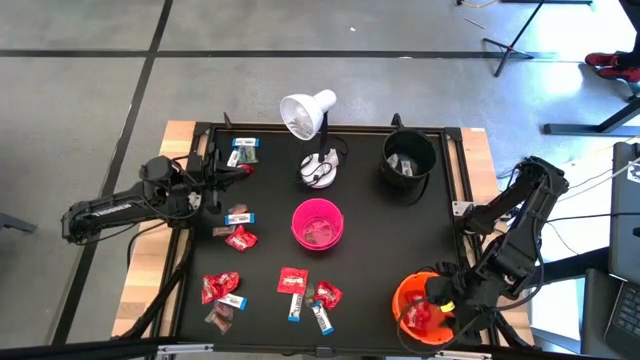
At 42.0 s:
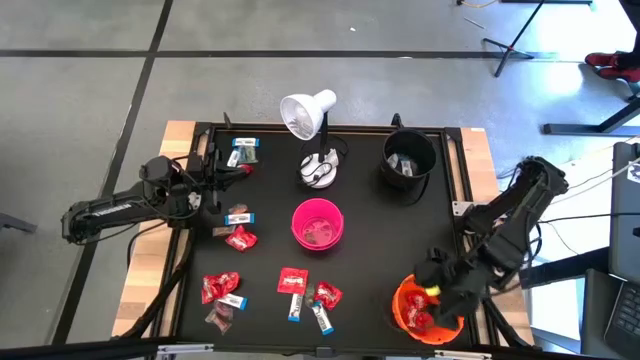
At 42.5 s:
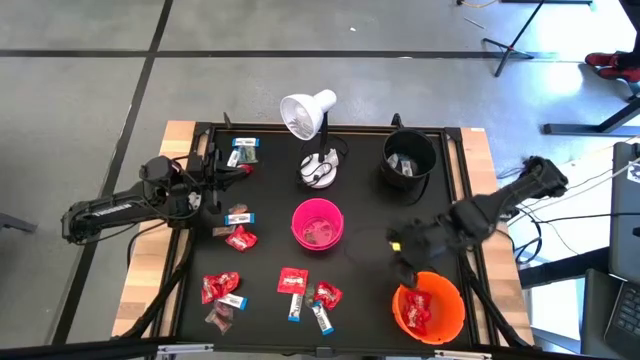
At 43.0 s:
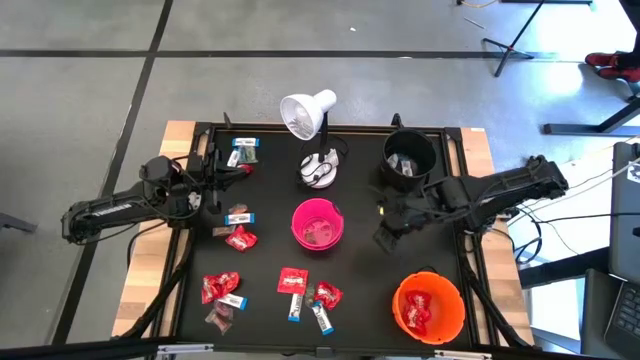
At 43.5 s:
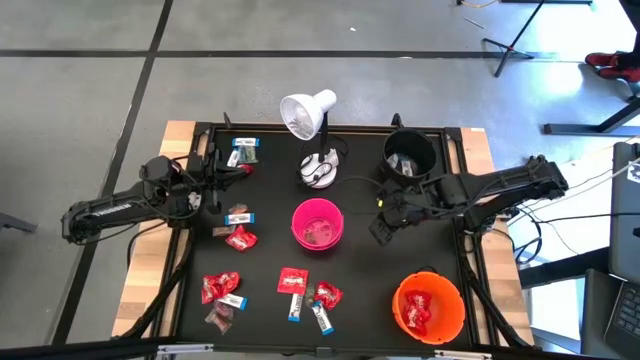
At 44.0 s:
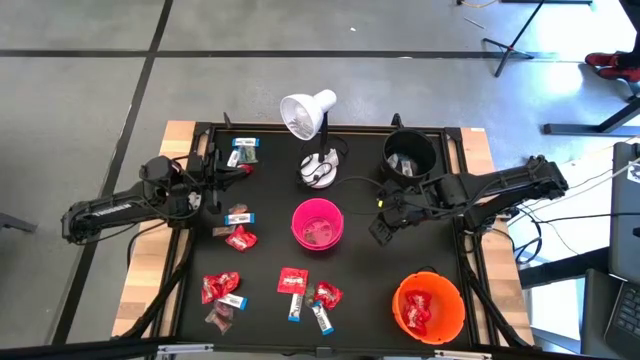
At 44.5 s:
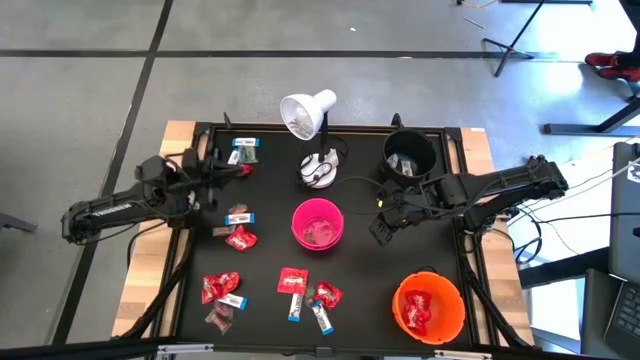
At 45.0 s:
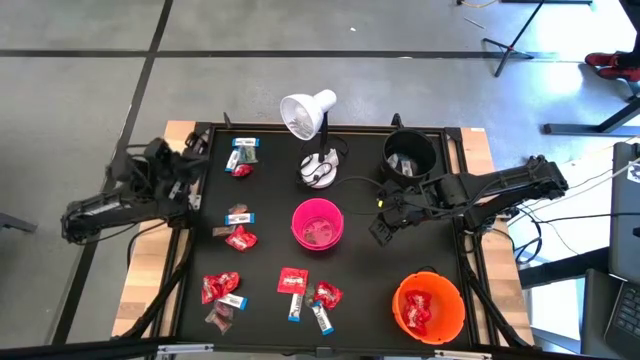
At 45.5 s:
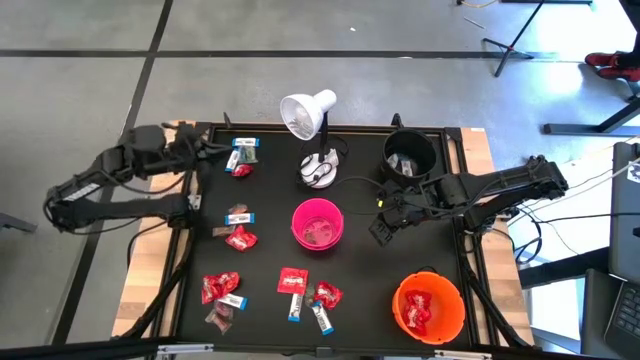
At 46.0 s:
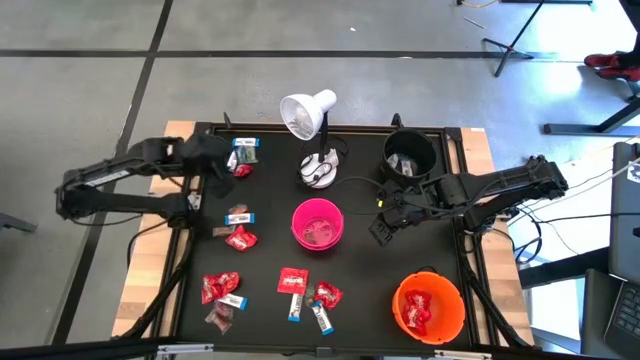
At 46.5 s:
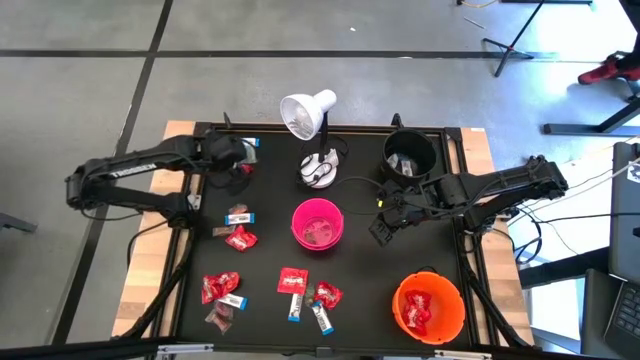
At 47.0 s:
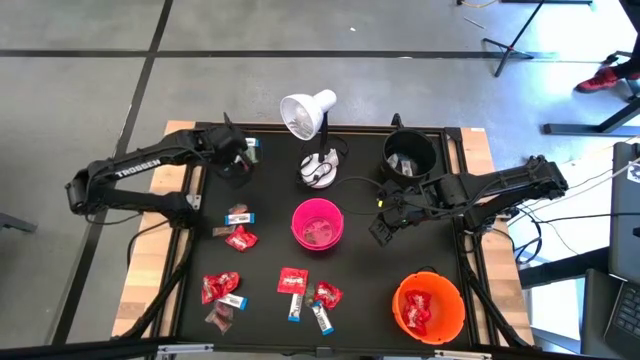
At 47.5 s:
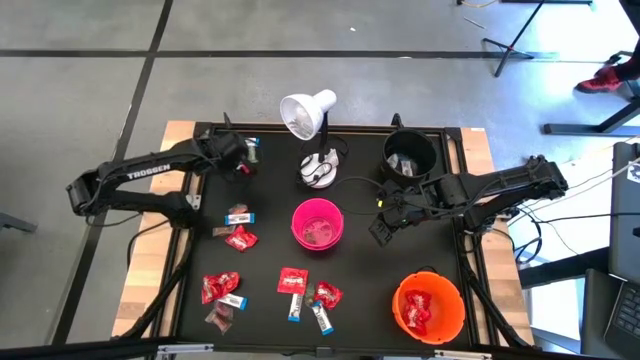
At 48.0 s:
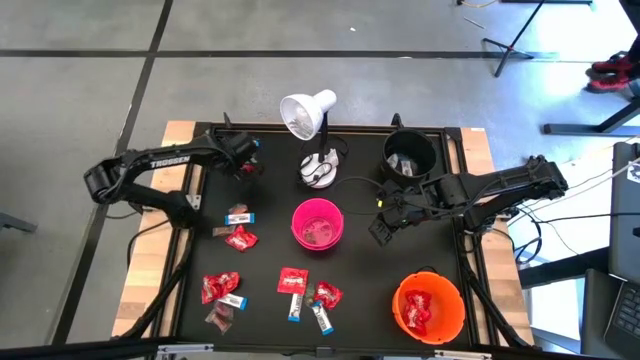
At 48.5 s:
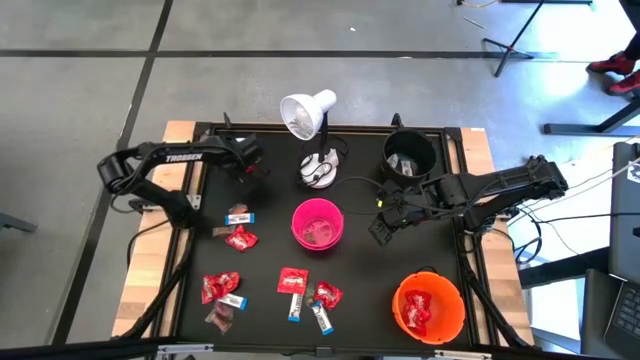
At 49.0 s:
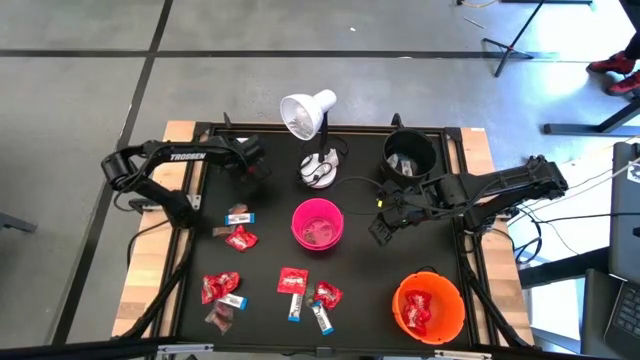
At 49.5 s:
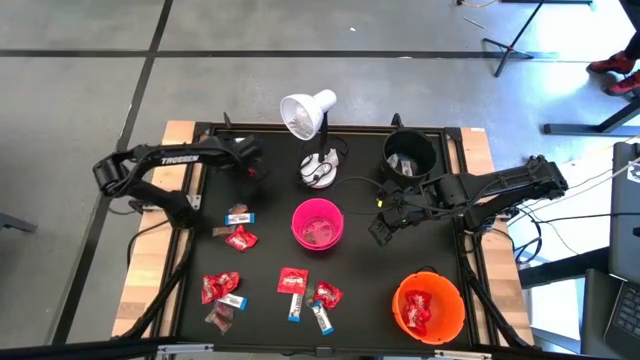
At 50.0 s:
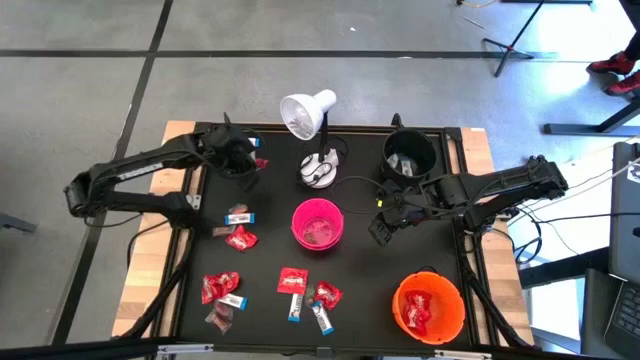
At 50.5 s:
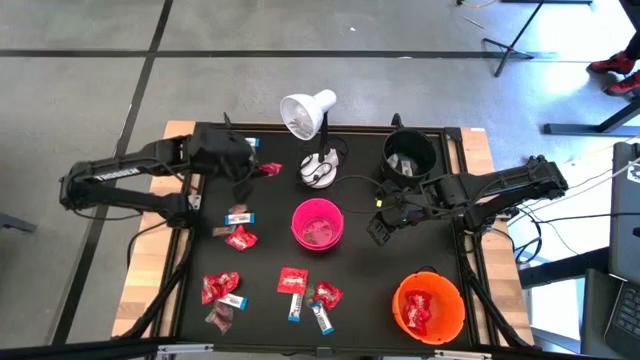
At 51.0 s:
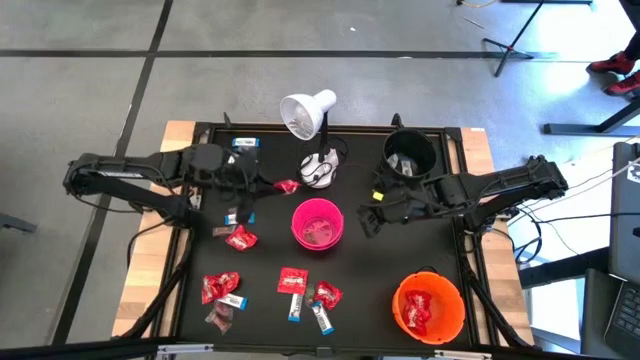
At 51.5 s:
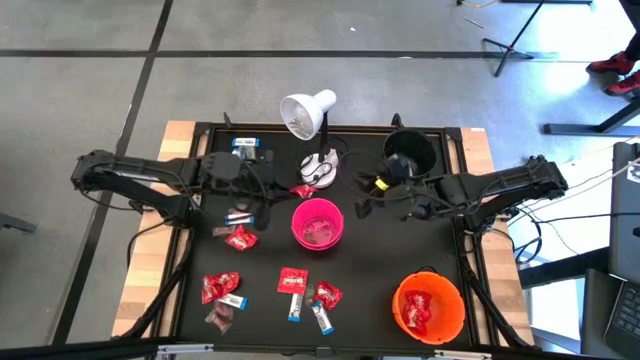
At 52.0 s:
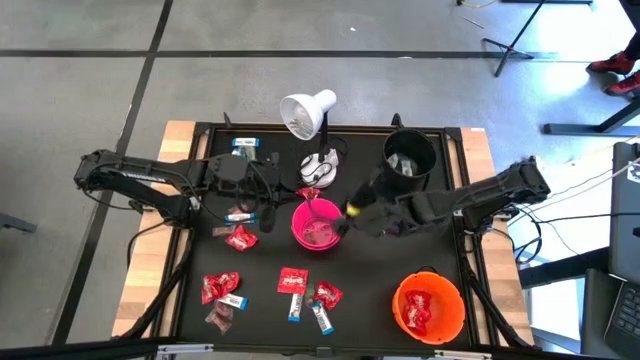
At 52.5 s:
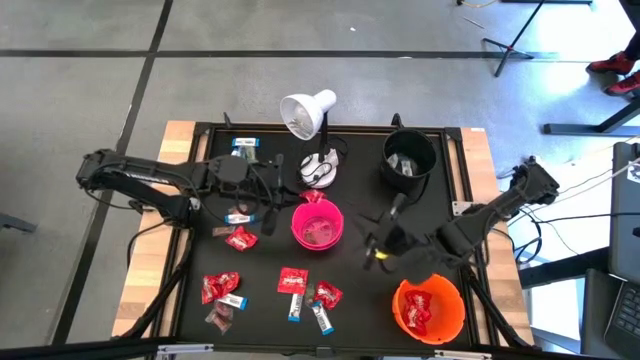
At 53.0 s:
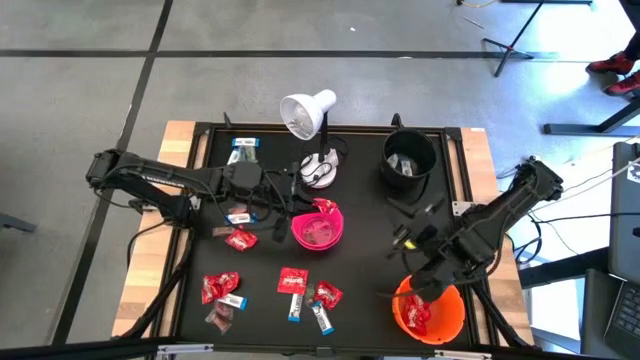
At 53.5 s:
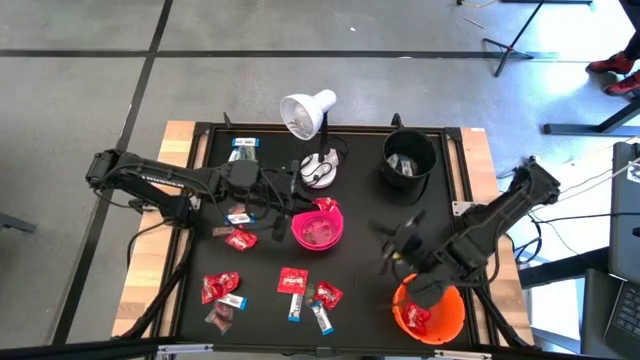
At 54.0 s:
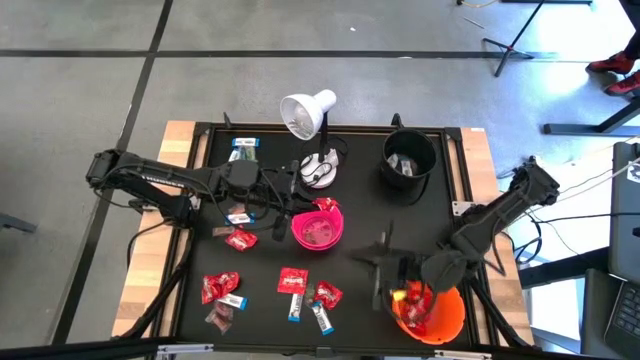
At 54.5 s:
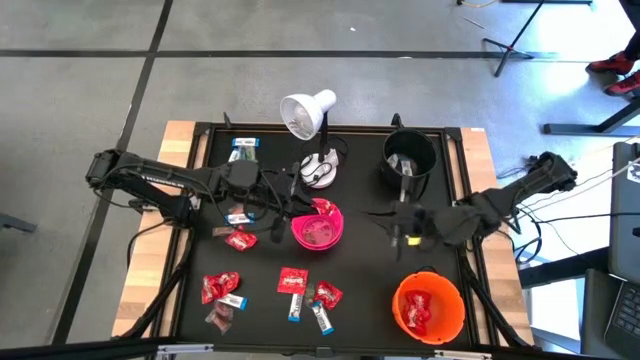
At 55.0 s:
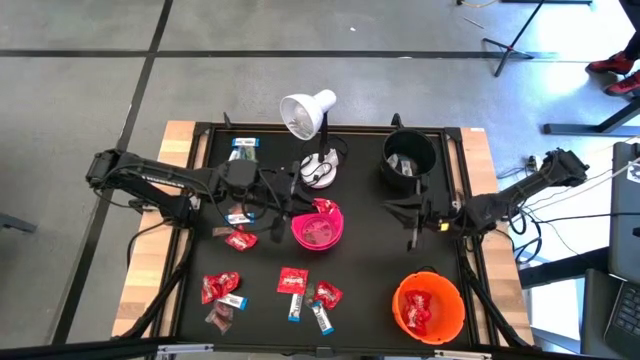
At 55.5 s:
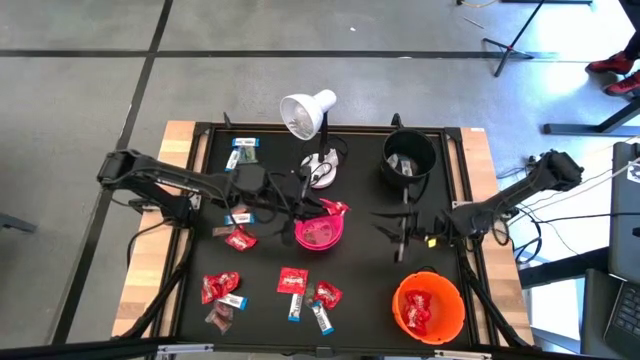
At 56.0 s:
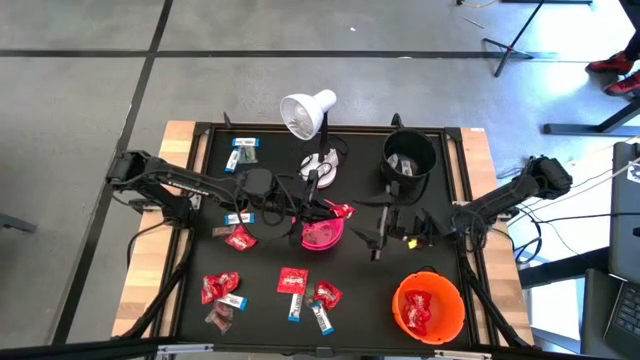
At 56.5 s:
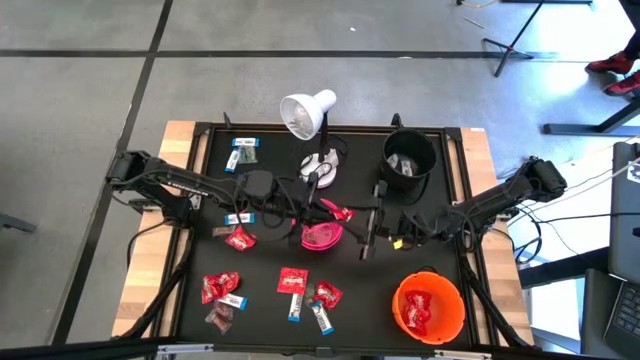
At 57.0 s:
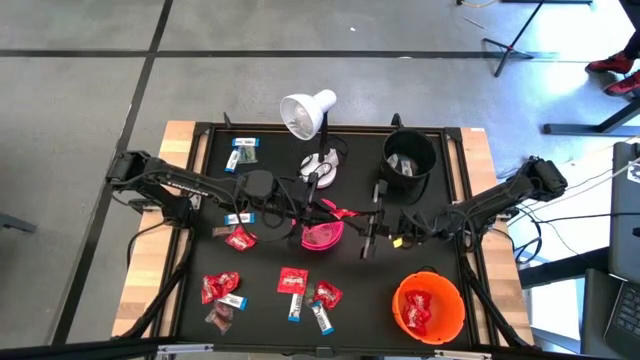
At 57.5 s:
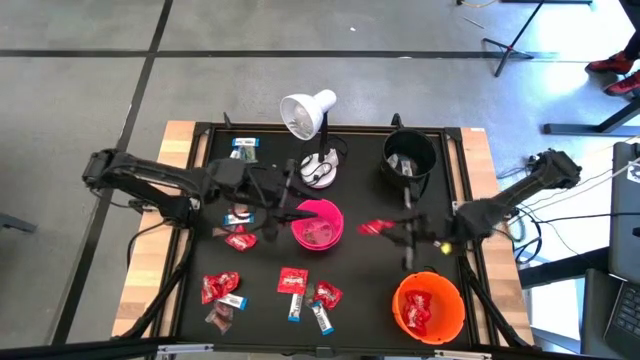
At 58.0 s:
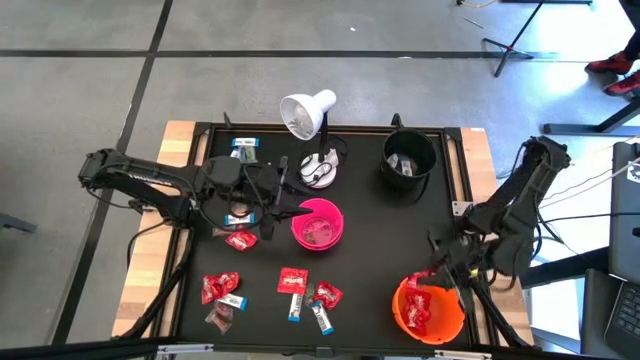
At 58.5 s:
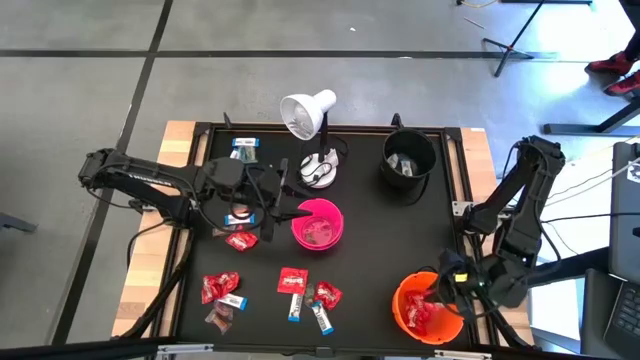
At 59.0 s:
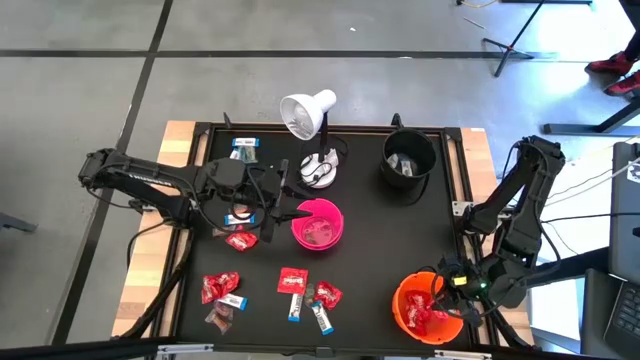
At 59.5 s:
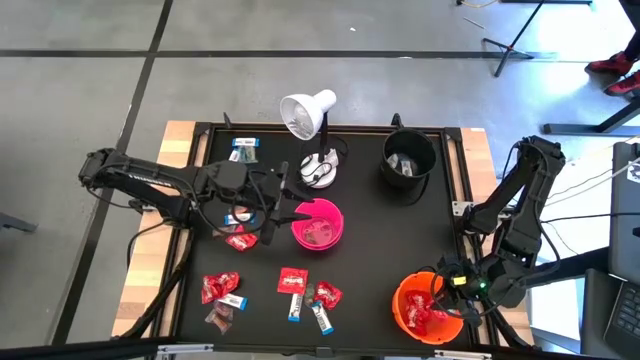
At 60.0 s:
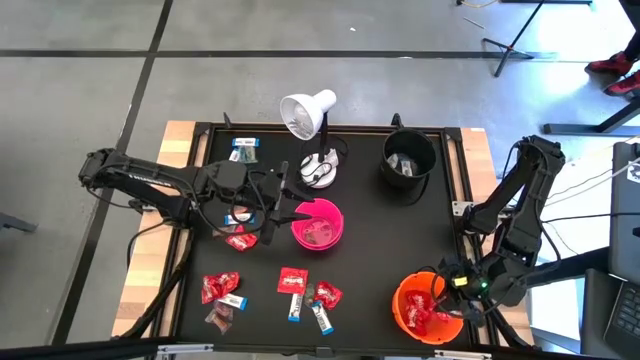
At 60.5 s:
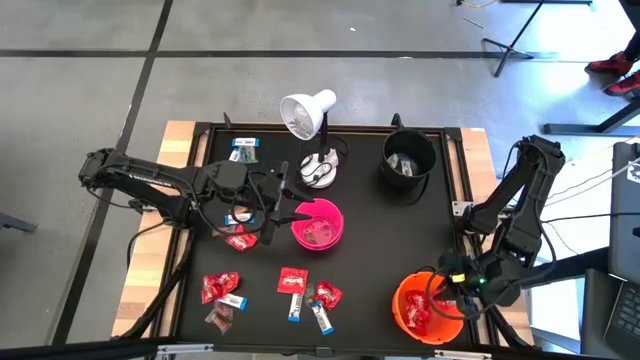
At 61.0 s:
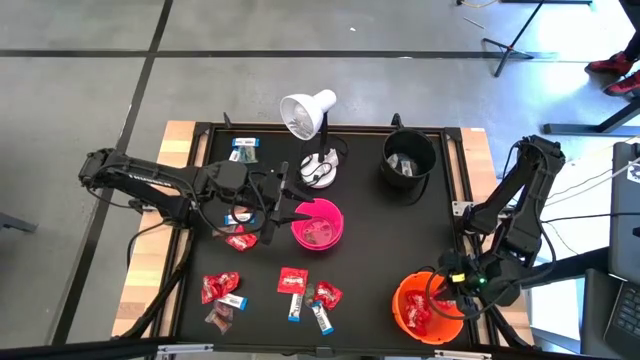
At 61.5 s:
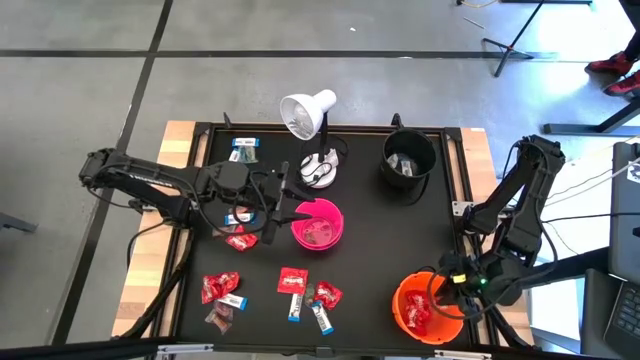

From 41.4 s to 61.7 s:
Task: Sort candy
Put the red candy into the orange bucket

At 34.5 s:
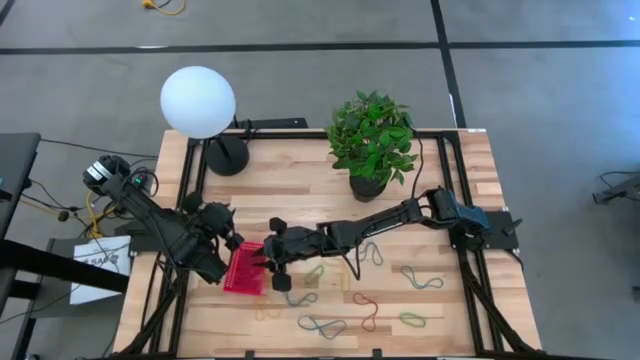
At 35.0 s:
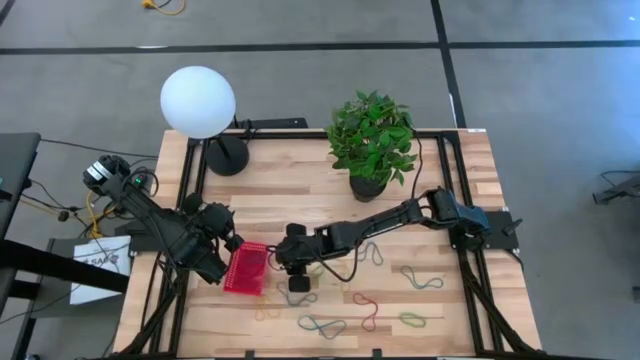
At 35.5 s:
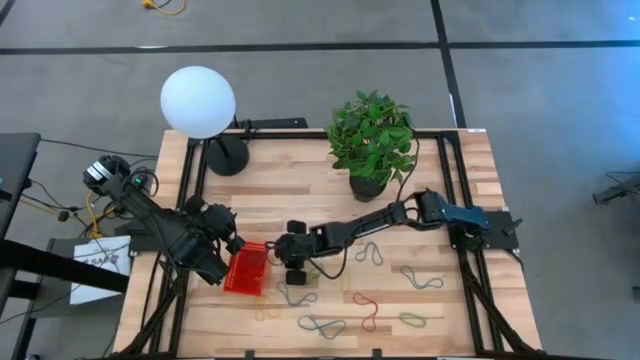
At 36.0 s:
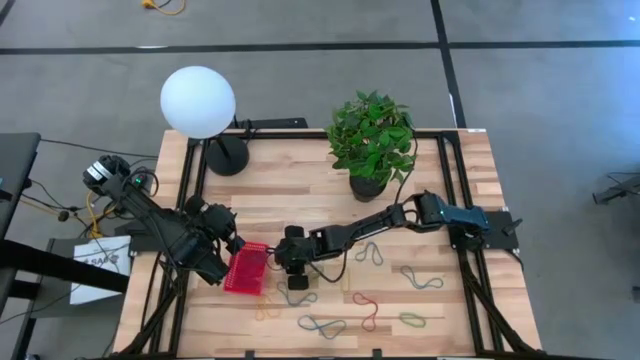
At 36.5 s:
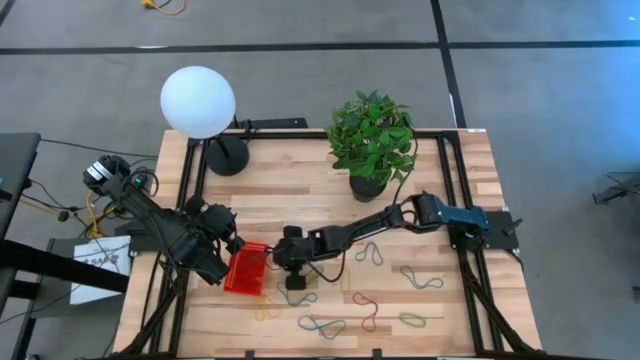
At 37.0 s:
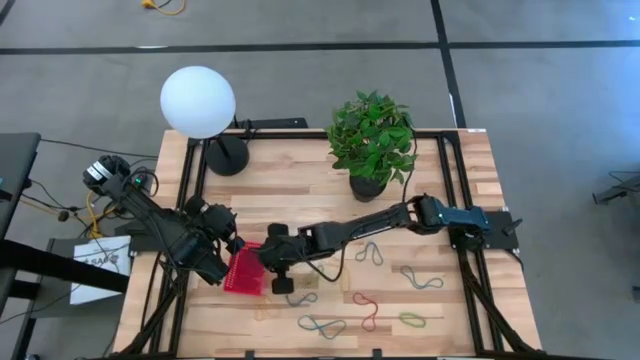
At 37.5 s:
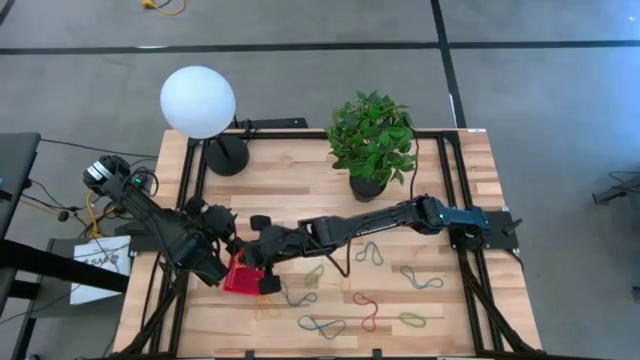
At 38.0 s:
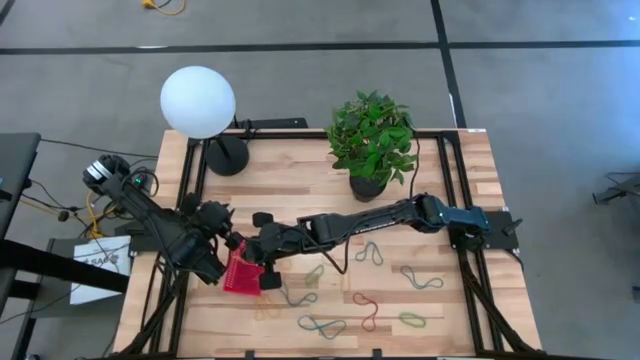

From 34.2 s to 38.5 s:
Task: Pick and place items into bin
Put the yellow rubber band into the red bin
